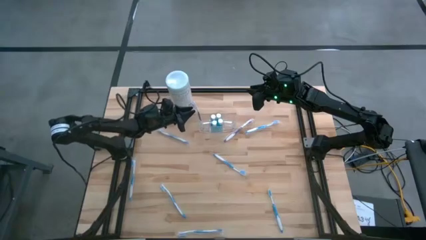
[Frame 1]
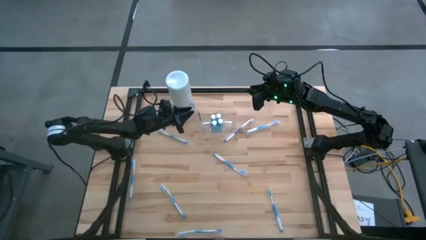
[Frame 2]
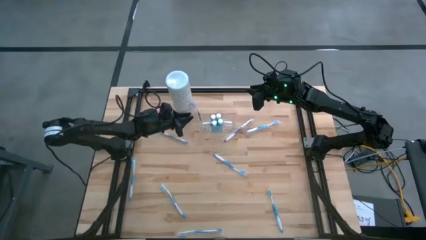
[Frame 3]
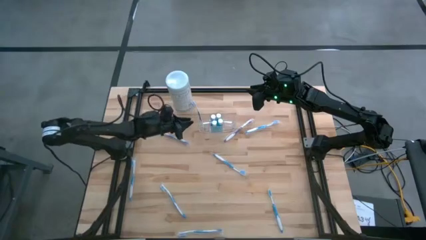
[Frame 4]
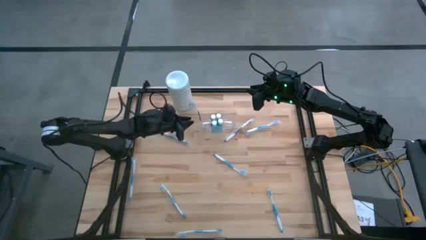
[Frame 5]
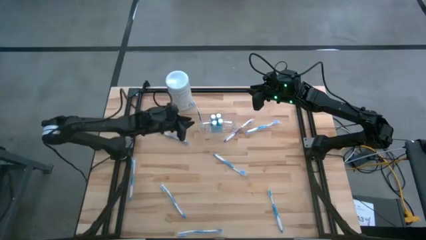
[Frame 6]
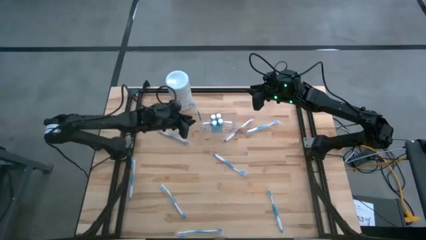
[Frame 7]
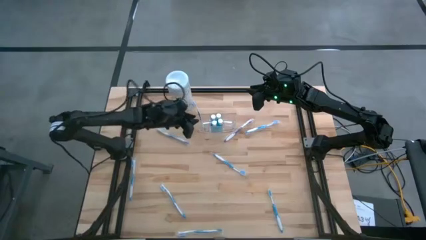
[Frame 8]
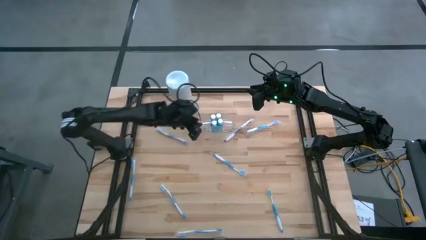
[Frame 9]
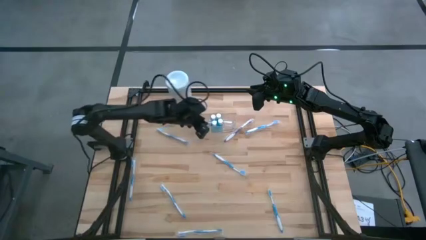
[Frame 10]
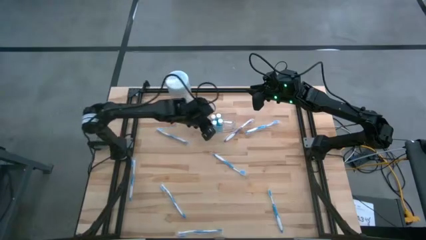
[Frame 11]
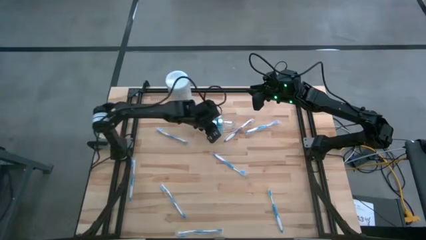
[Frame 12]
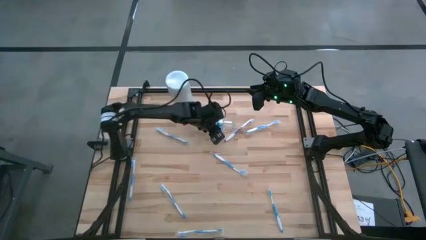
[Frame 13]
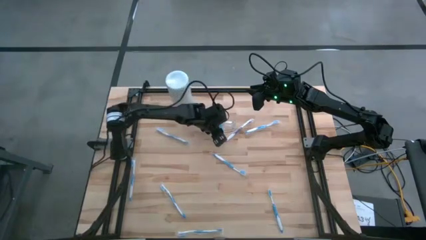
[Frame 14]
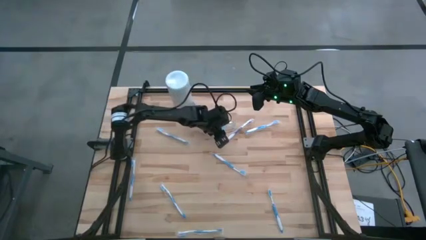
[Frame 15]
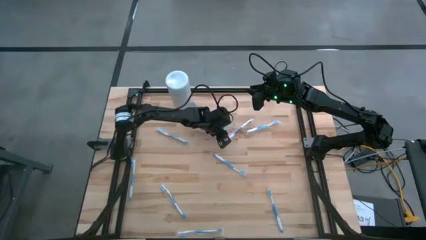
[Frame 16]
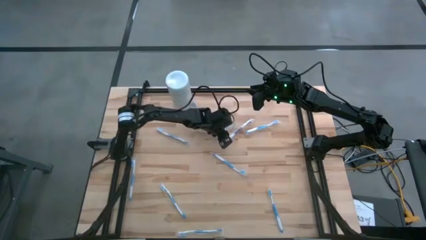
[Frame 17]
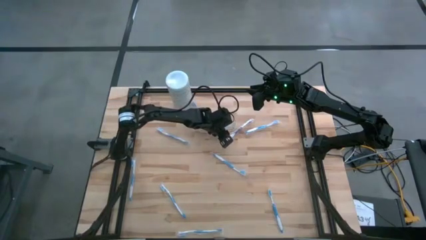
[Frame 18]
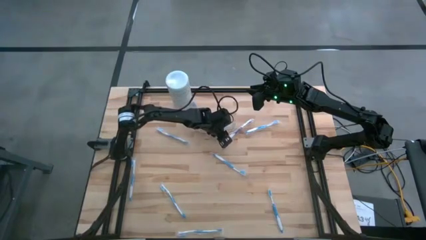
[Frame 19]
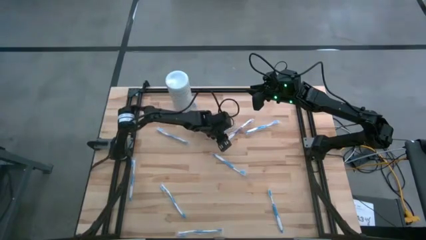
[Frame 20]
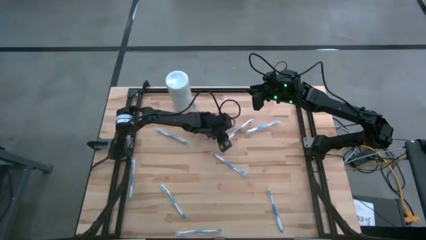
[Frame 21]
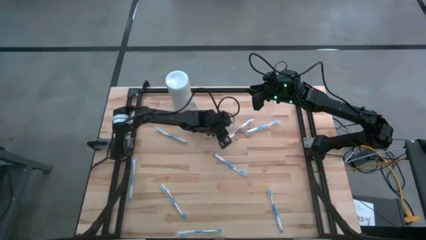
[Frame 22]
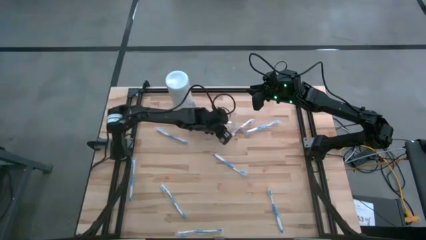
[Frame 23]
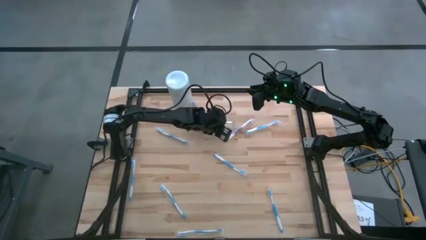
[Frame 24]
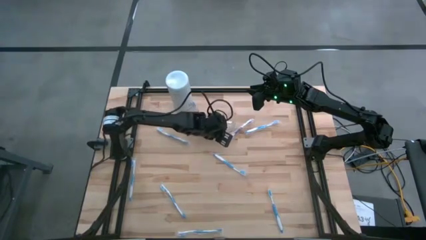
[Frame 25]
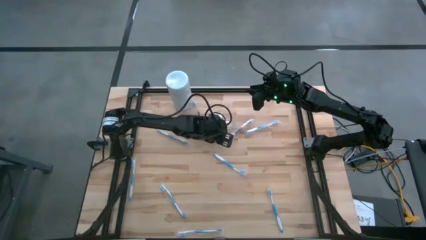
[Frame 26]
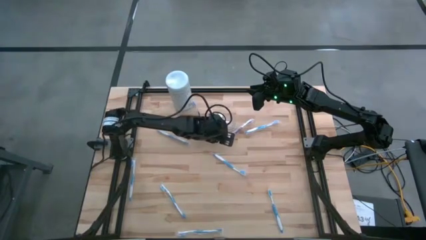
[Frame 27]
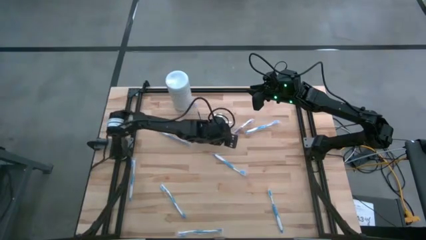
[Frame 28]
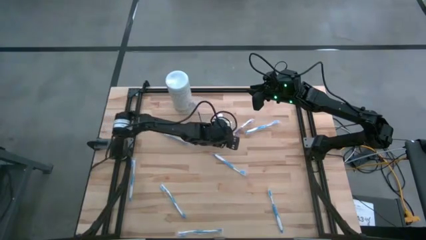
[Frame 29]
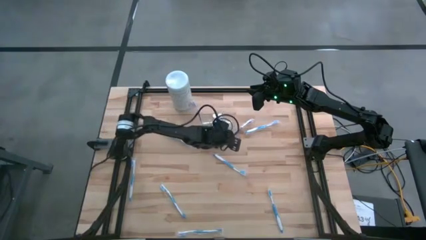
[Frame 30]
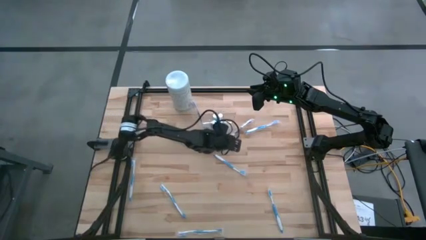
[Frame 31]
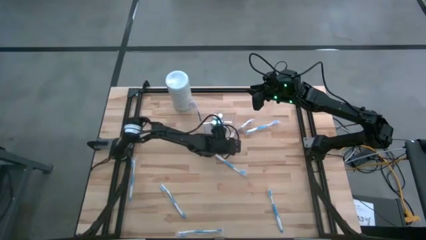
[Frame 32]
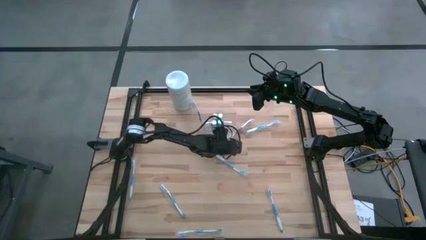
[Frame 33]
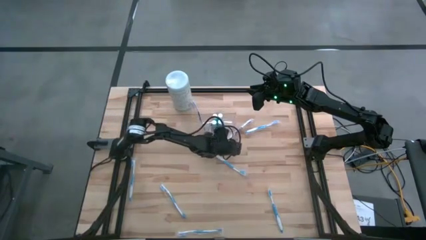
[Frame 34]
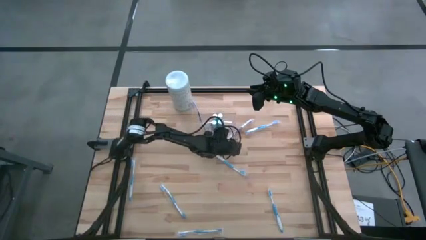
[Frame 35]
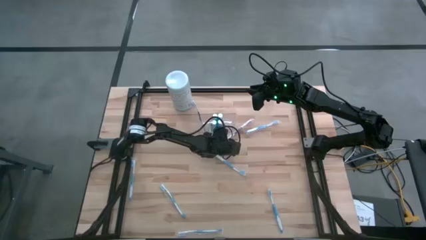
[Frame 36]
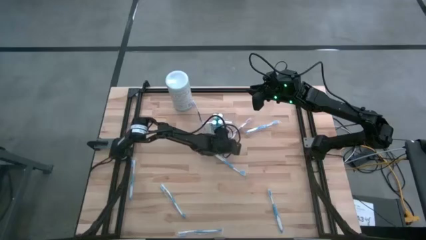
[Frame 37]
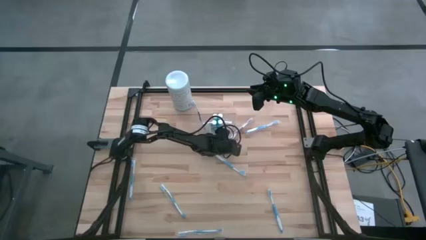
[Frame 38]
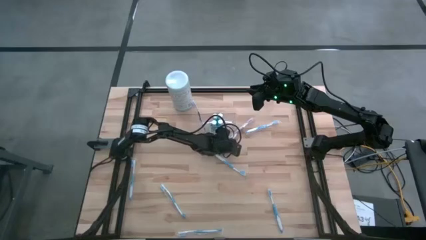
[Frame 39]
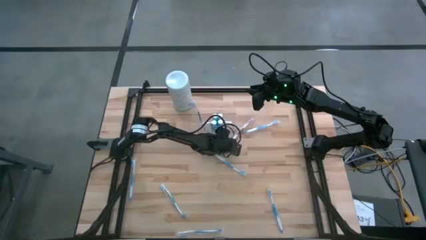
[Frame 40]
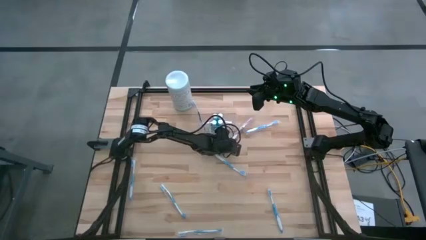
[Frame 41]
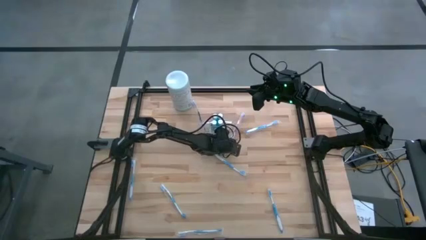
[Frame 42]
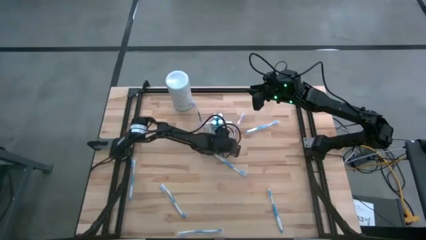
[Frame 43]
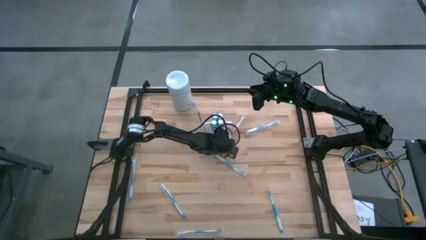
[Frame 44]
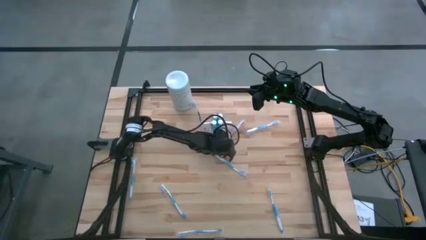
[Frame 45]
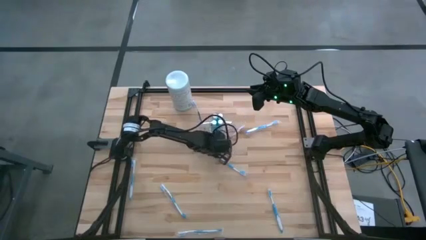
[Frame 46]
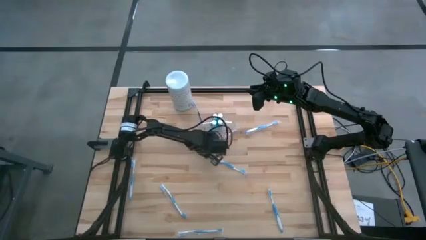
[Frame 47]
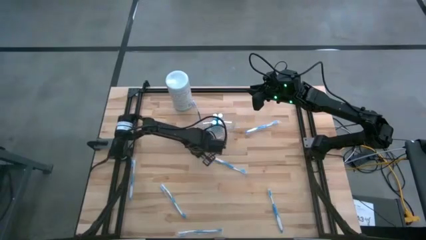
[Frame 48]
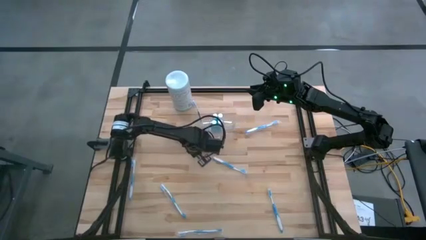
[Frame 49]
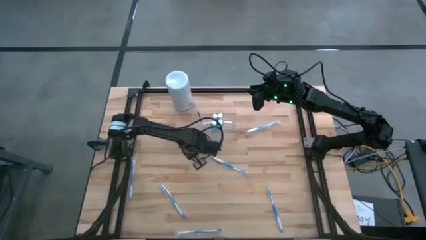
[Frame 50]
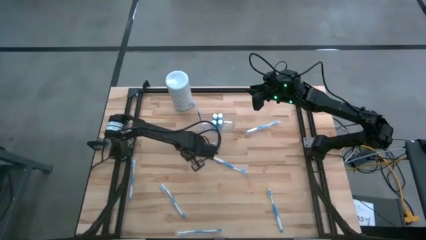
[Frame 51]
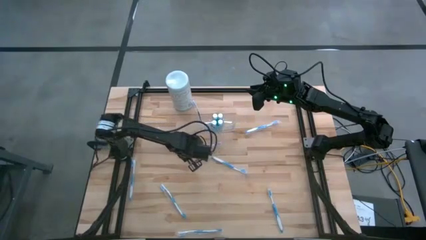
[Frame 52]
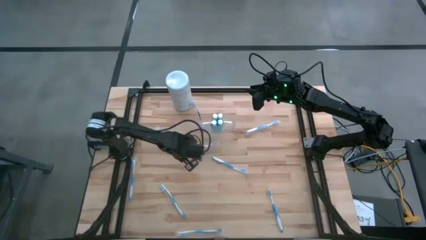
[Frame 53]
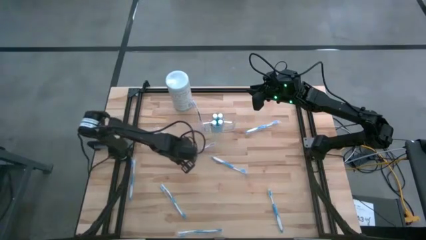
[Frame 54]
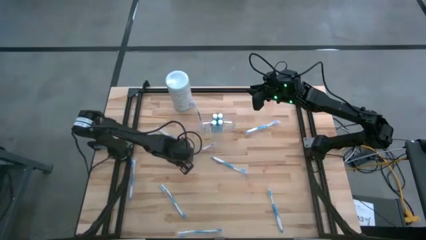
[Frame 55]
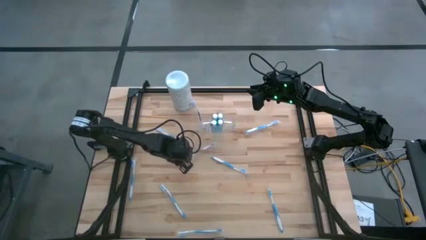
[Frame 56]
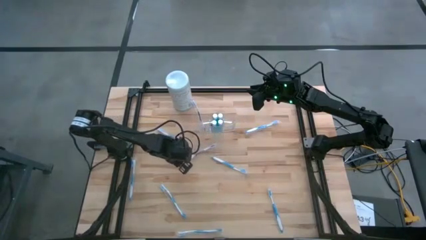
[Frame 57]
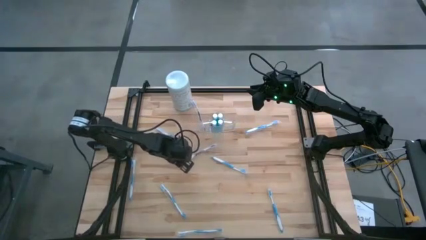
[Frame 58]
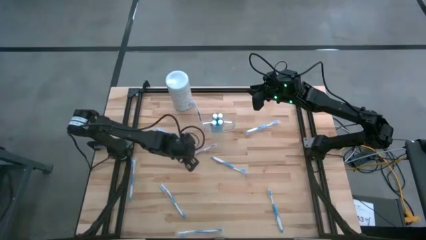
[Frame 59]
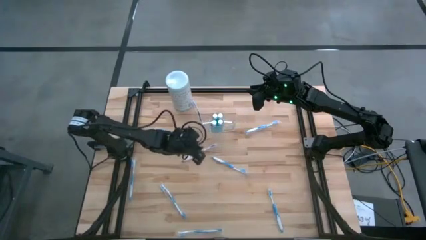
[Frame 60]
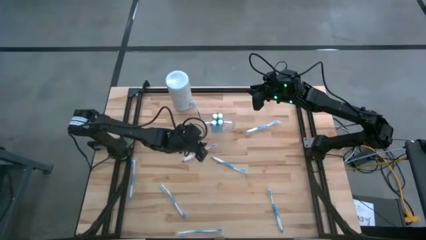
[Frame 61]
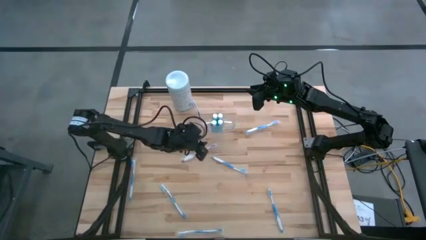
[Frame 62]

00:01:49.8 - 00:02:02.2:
Task: Pick & Place toothbrushing station
Put the violet toothbrush into the left of the transparent organizer

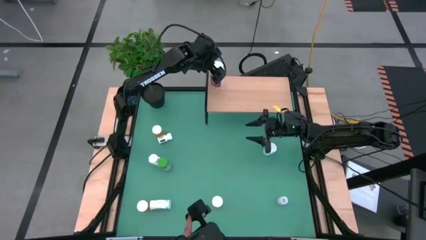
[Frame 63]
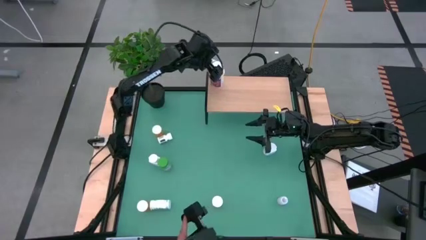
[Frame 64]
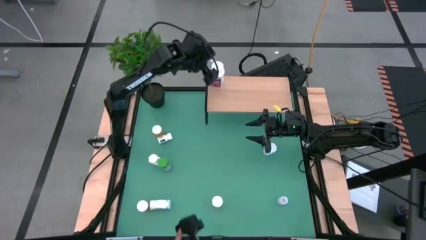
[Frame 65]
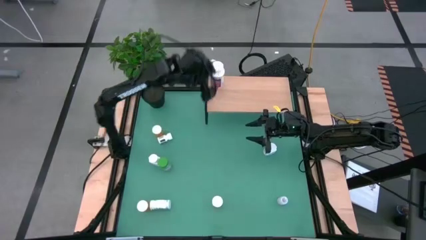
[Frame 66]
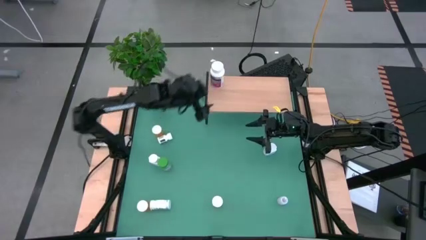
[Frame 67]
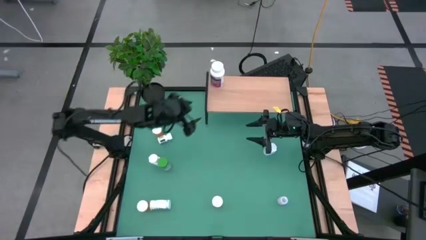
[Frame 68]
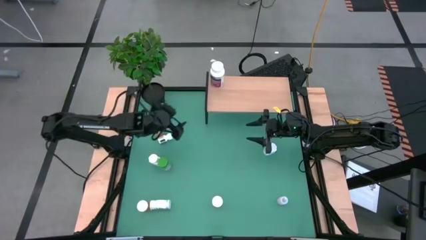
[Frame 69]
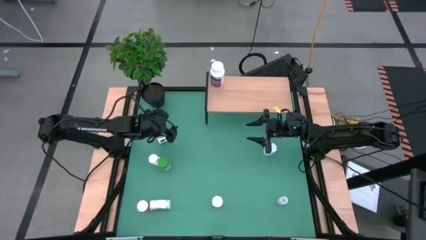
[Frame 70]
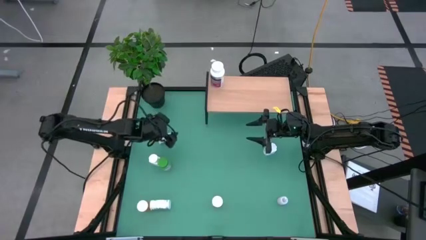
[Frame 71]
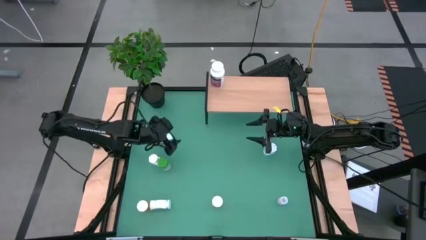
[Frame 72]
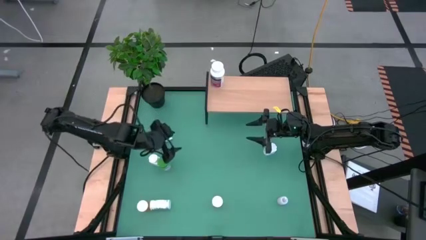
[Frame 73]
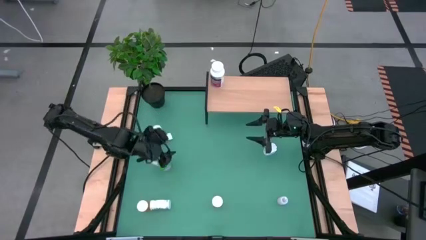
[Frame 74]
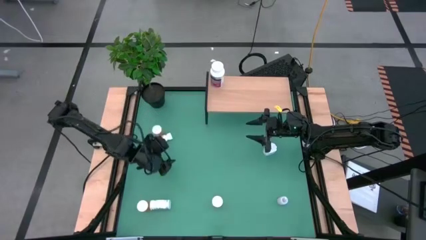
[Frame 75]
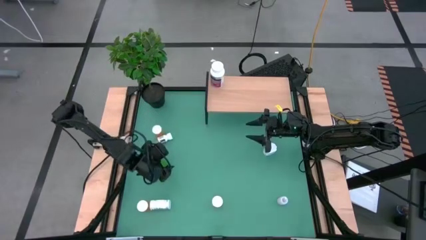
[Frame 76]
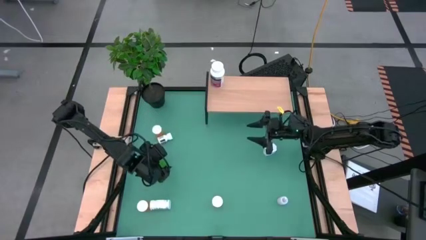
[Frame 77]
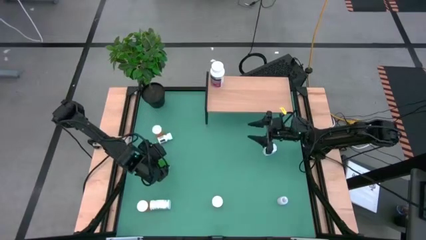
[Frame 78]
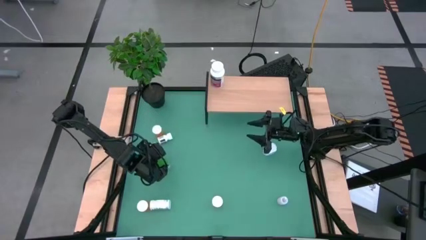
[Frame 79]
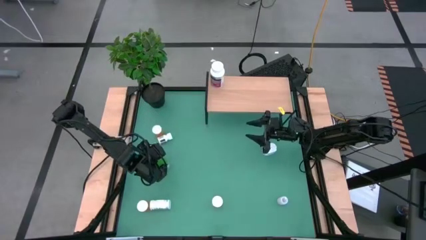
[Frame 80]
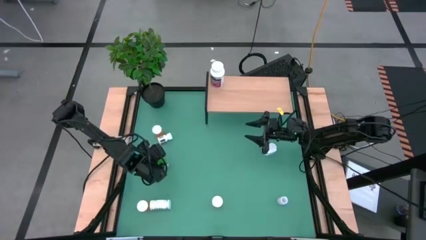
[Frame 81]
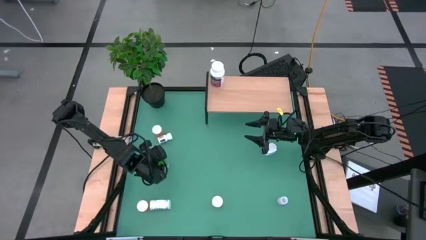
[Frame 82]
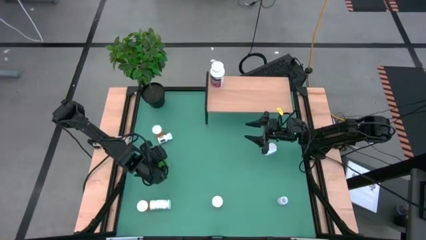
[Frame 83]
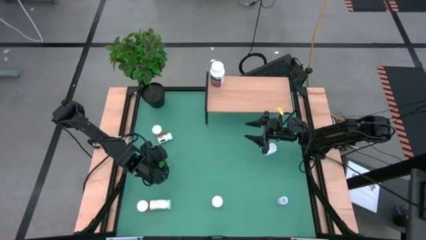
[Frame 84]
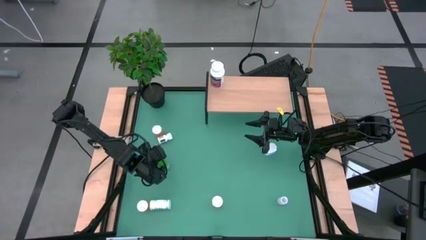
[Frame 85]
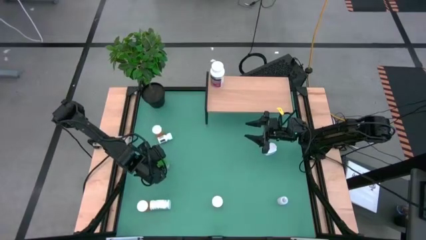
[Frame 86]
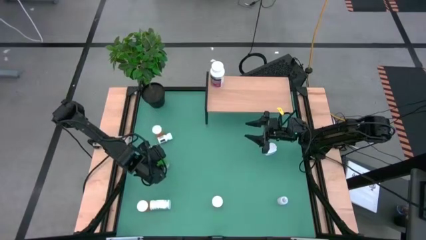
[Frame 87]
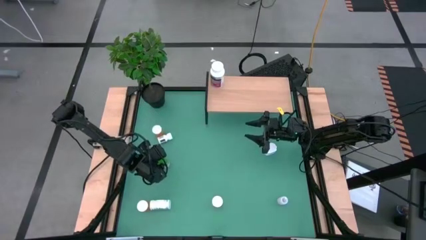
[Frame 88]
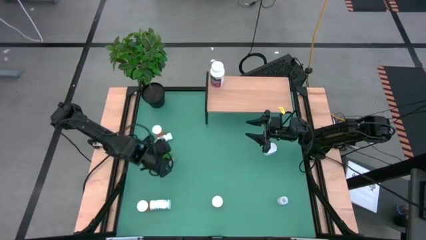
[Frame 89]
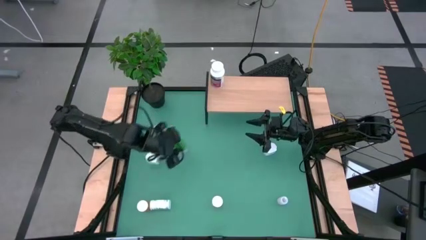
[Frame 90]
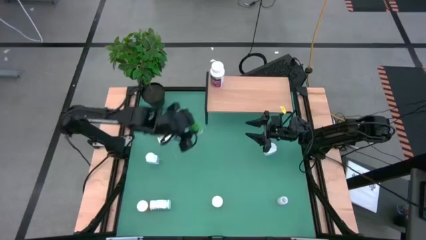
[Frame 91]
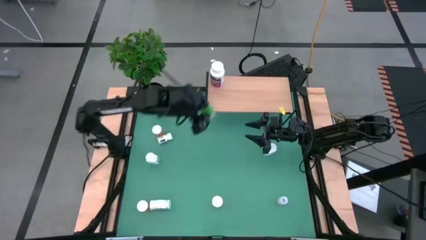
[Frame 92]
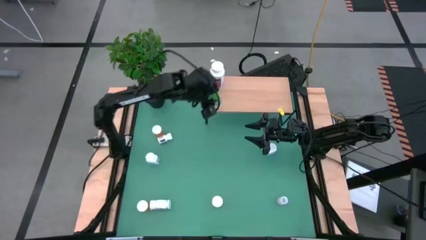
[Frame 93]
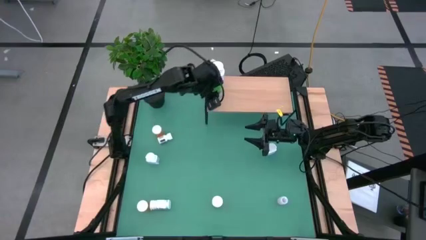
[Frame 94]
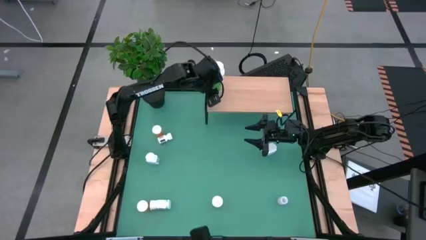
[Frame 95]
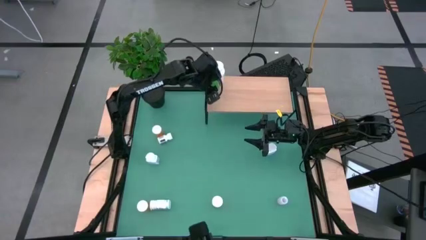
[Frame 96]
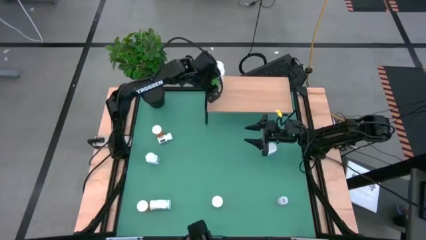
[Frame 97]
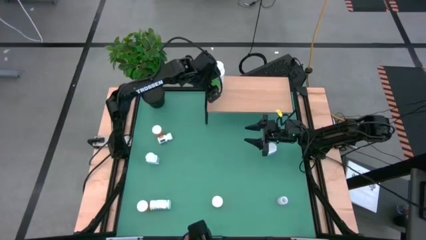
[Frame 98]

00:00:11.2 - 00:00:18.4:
Task: Pick and place medicine bottles onto shelf by color
Put the green medicine bottle on the shelf
